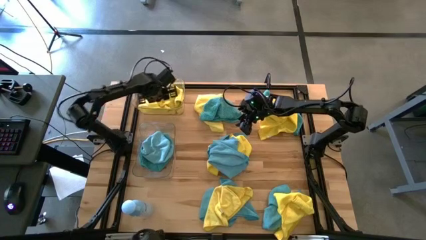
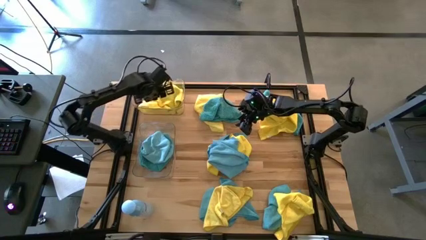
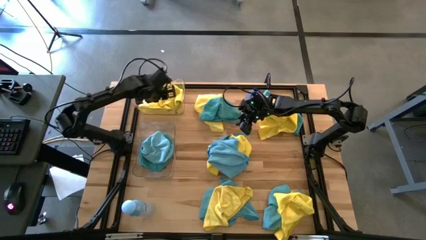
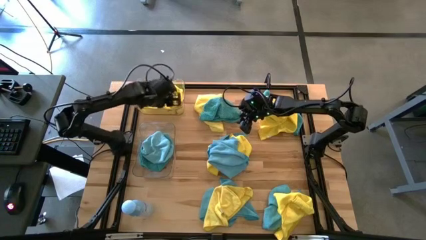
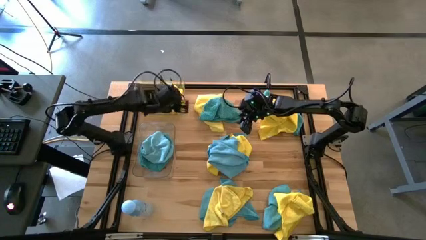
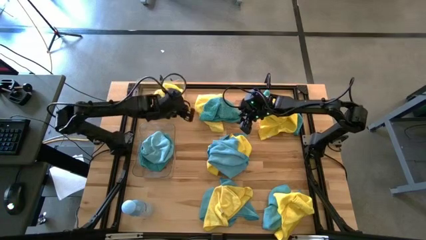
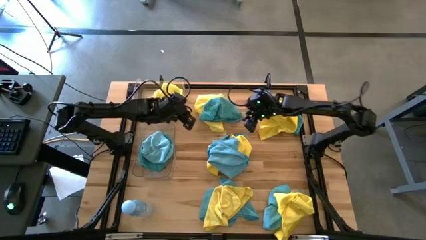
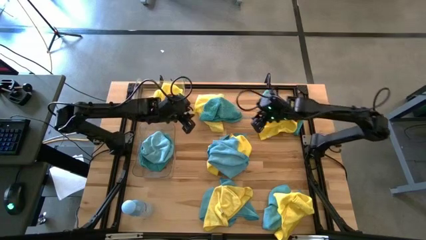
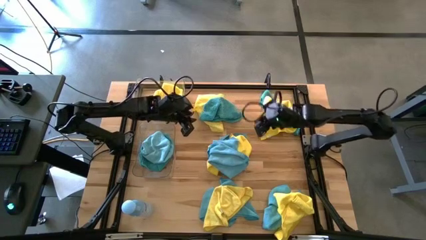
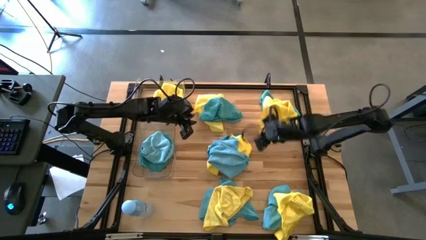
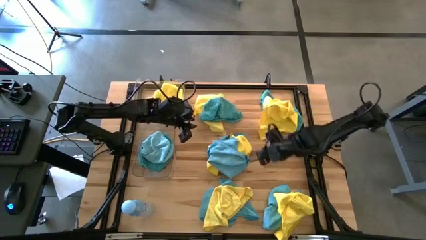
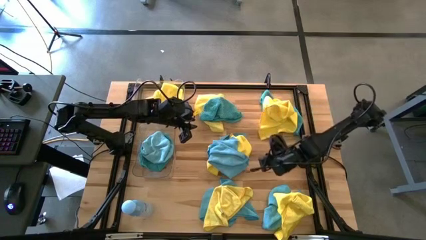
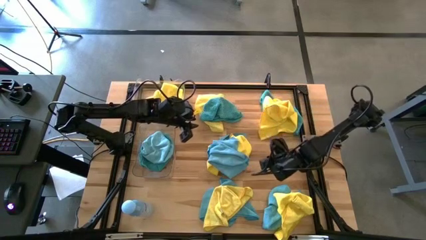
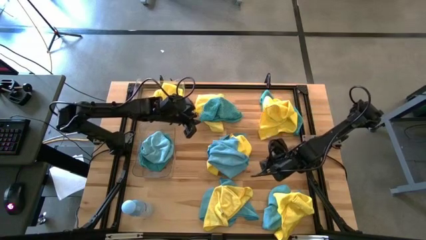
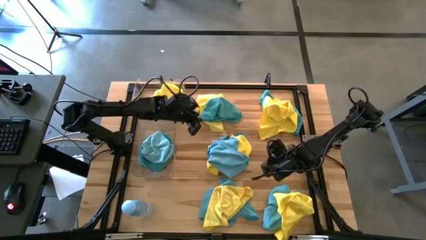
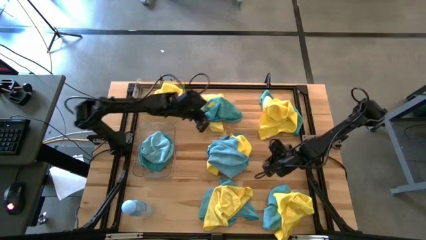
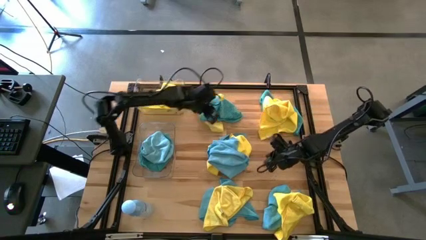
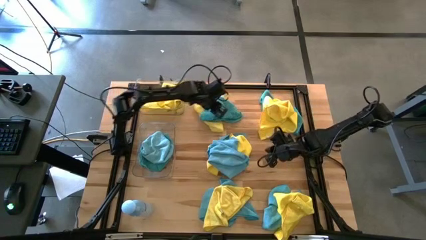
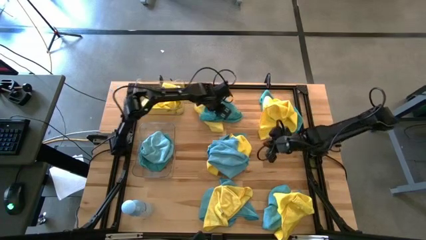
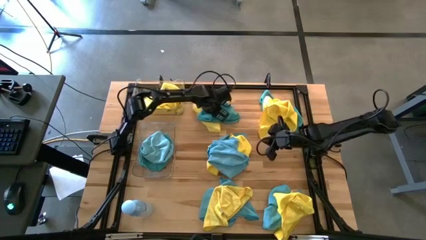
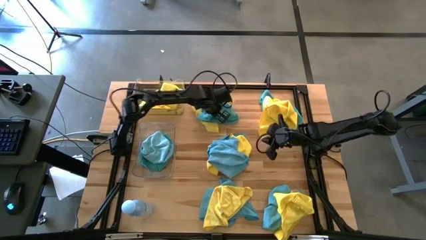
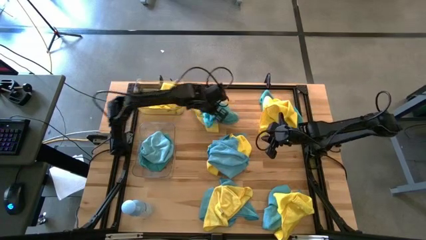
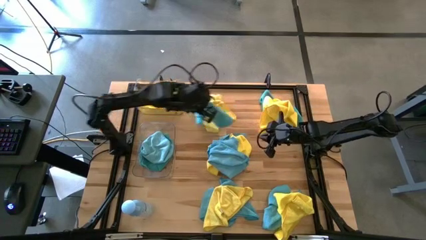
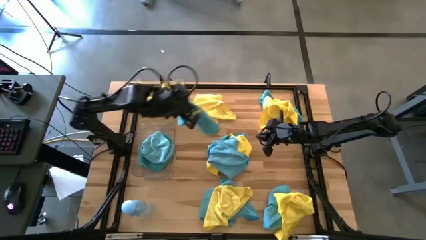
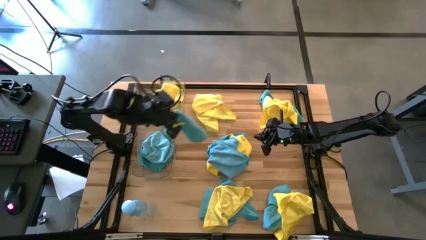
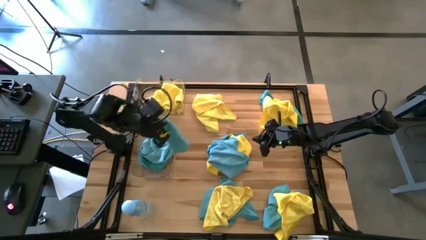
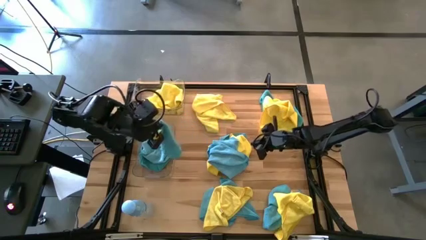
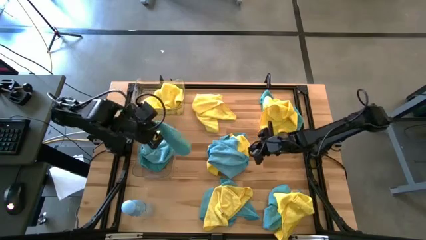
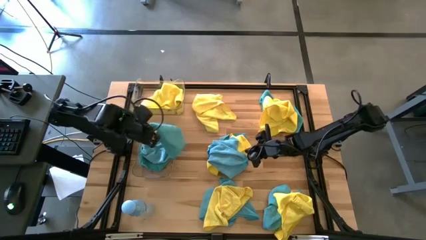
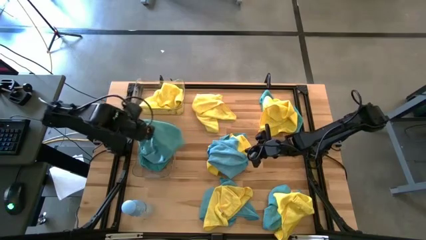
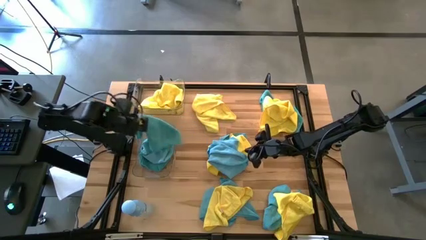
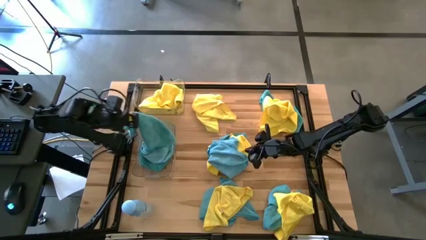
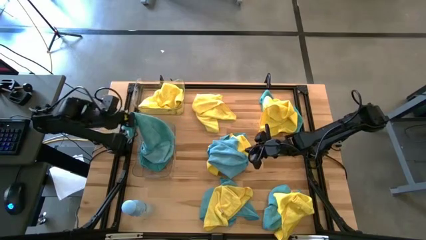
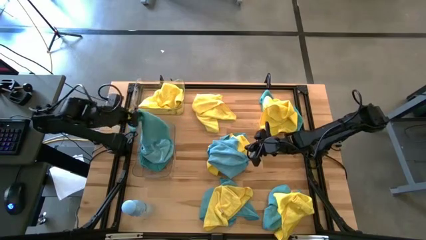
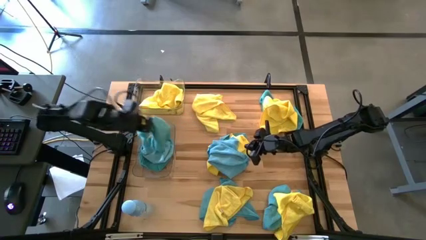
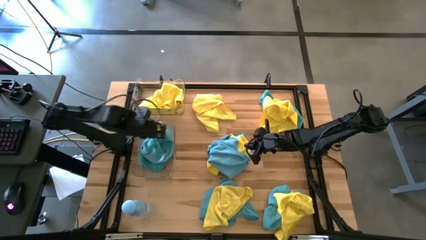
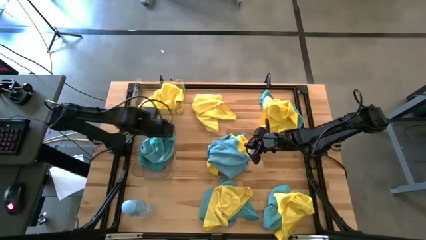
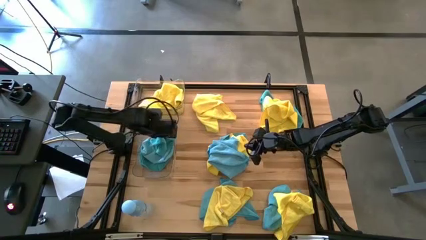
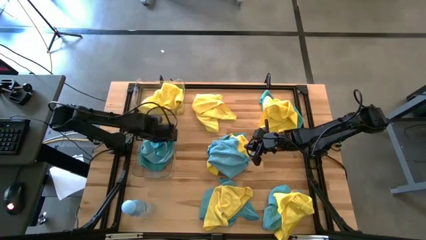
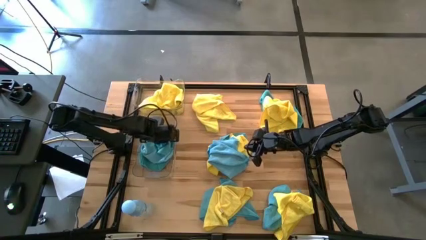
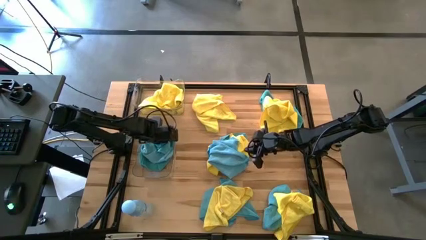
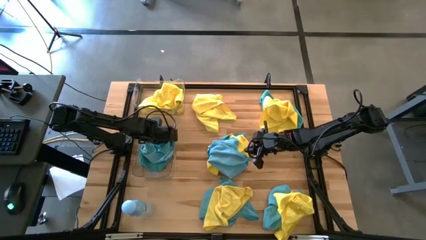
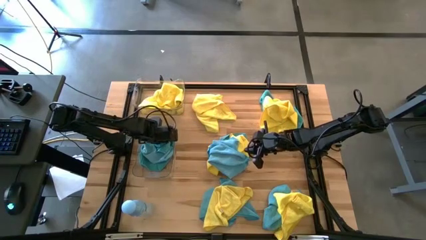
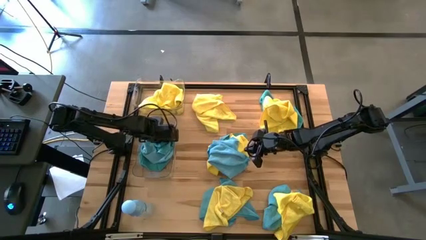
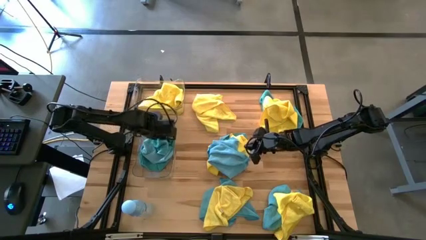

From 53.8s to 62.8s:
Task: Sort microfiber towel by color & place in baskets
Put the blue microfiber cloth into the bottom transparent bin

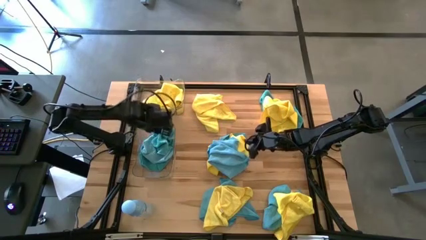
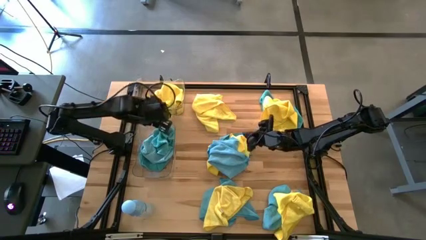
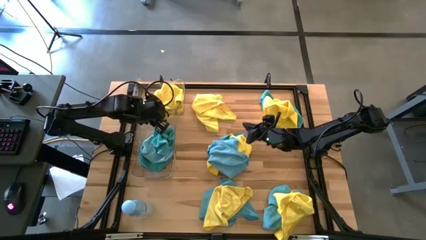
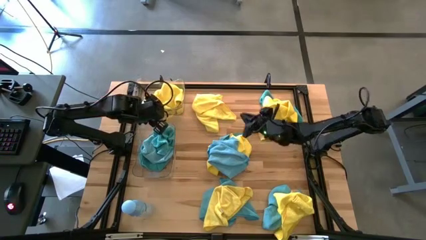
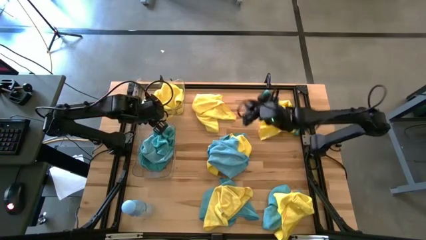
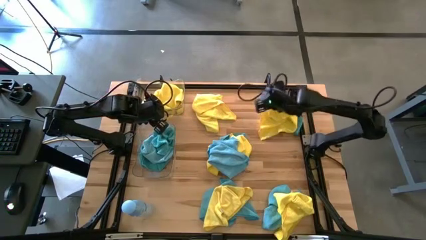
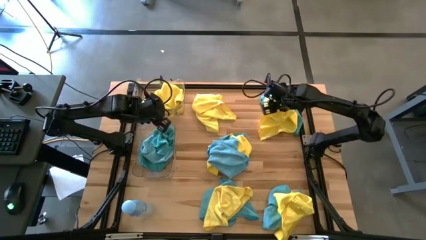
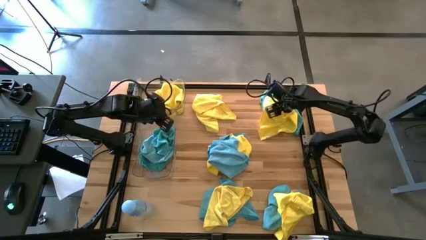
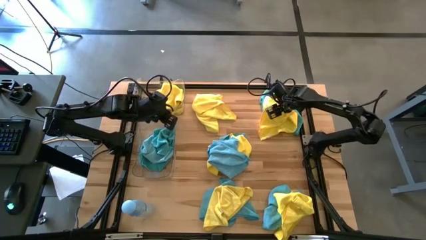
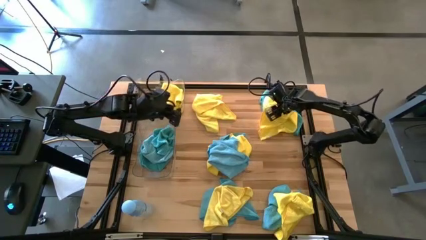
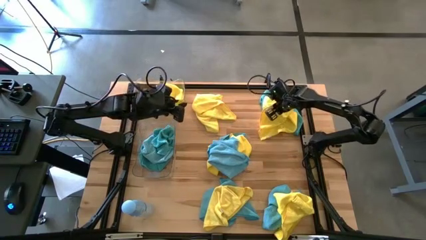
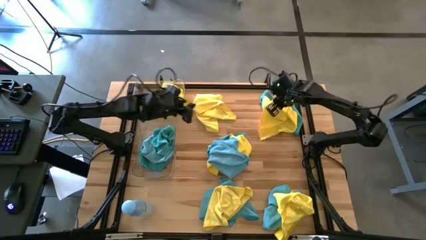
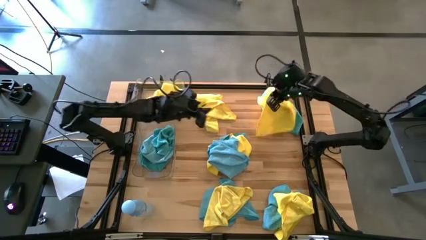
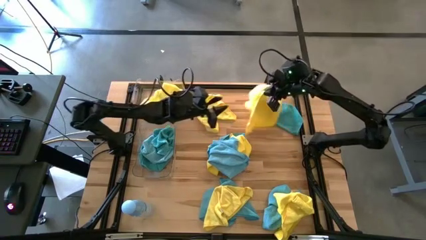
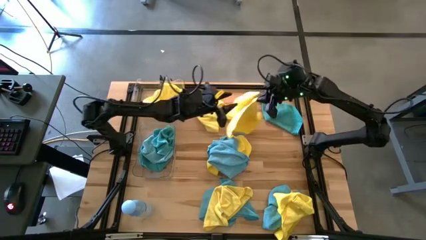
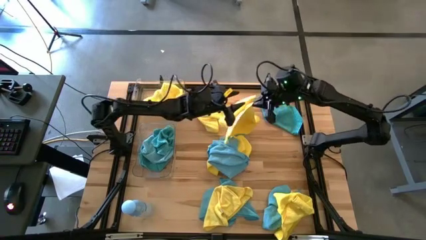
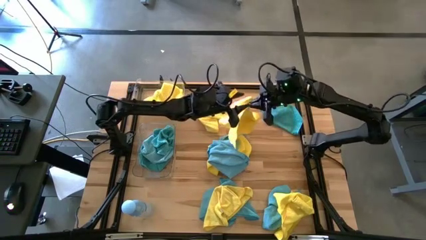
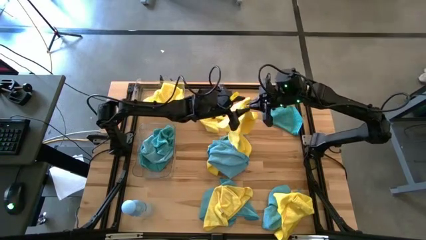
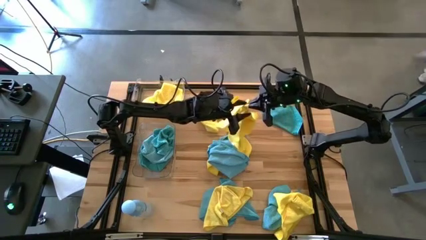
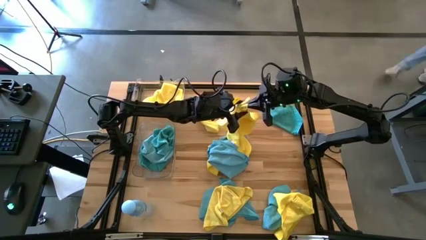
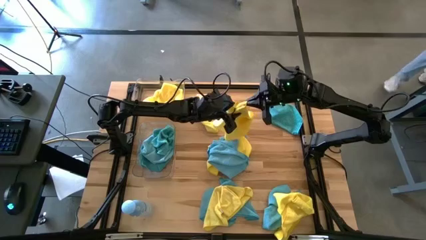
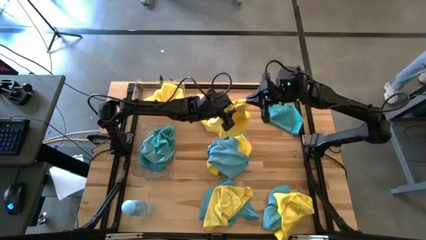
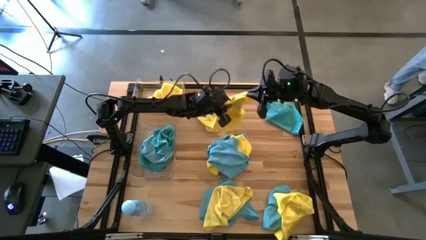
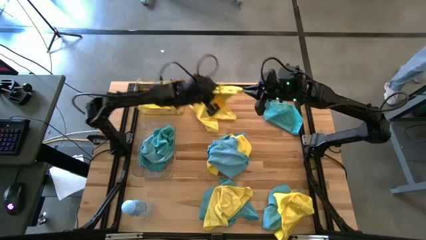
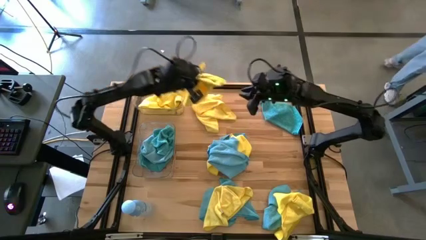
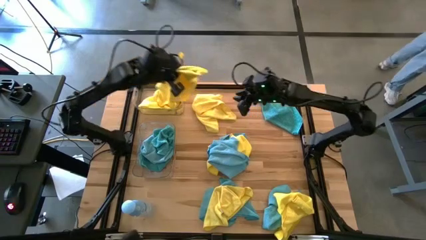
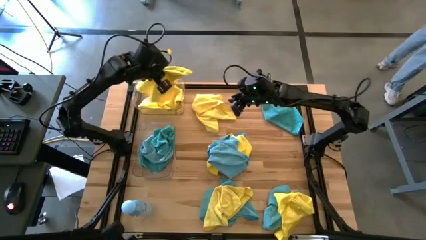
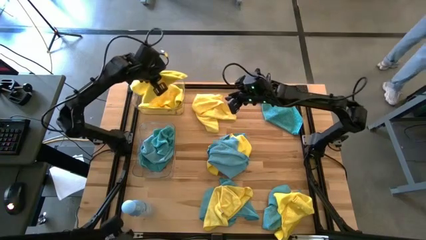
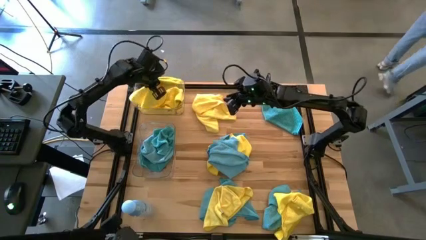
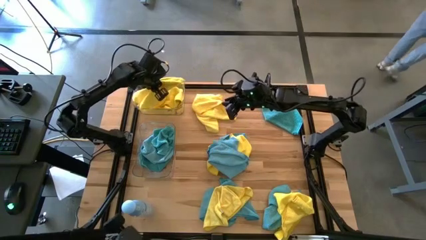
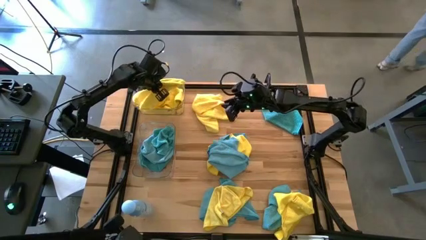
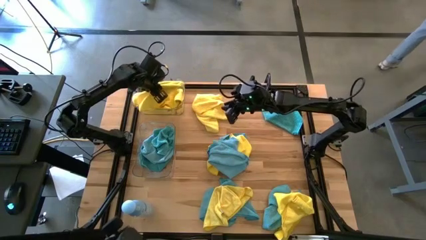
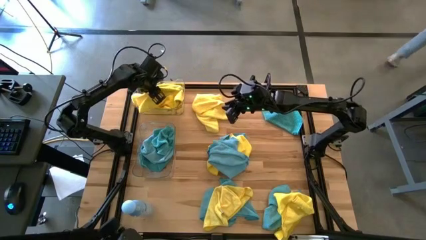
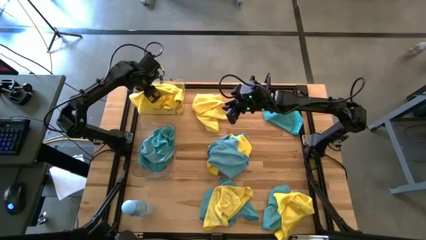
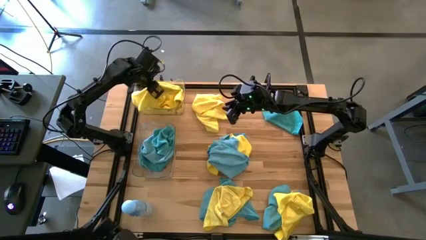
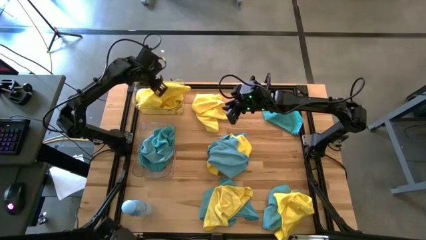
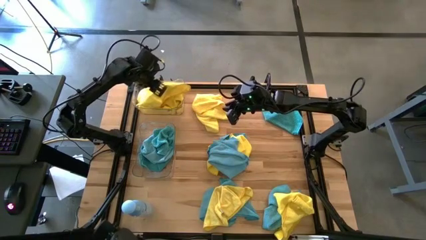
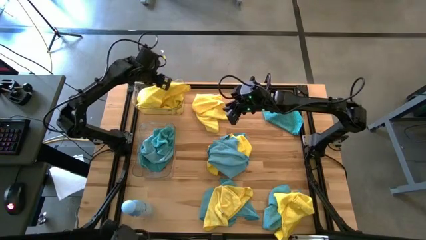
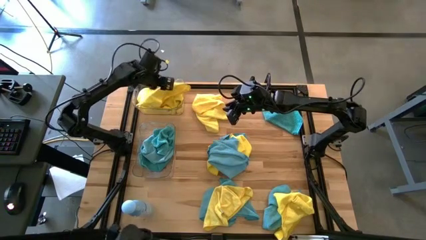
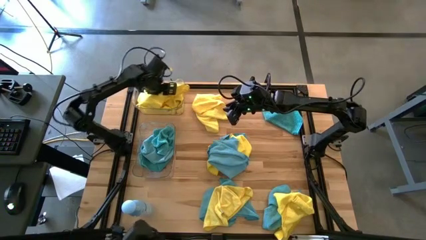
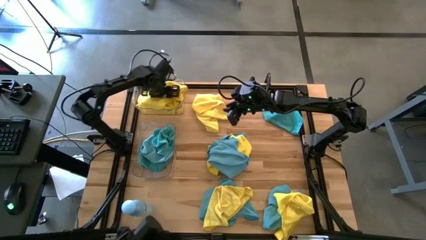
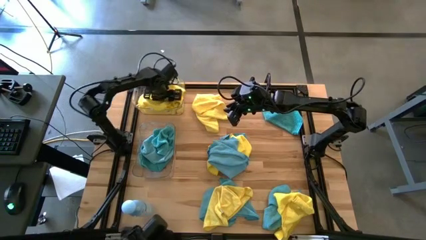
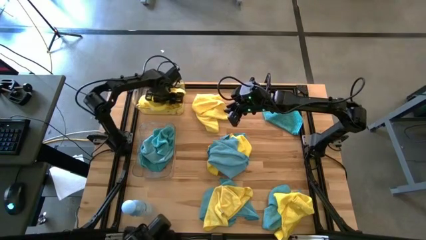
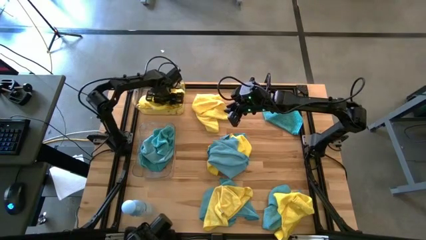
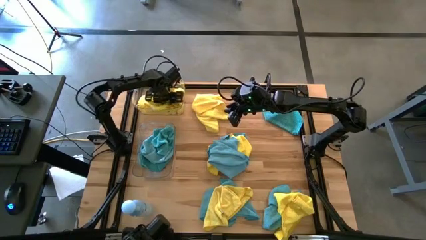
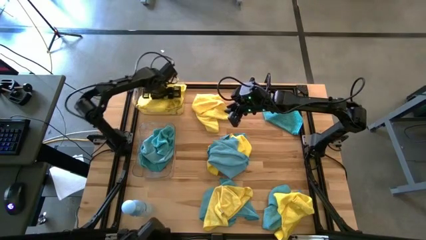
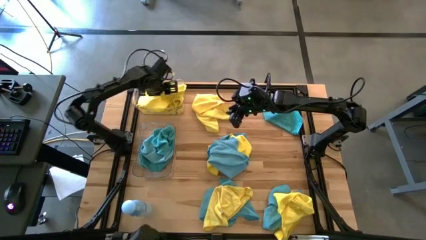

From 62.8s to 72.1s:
Put the yellow microfiber cloth into the top transparent bin
